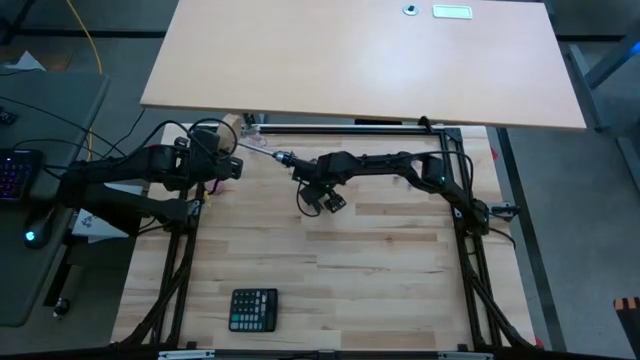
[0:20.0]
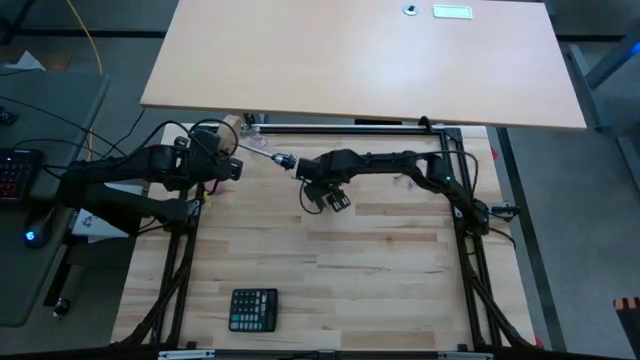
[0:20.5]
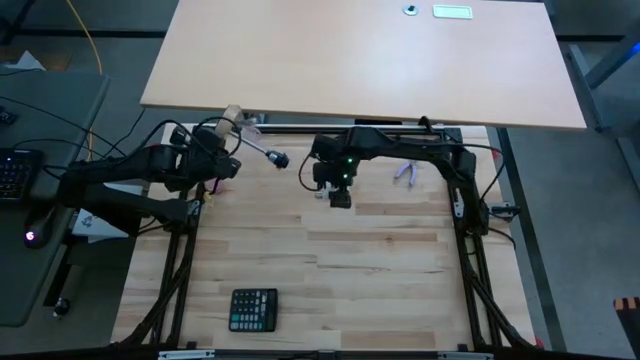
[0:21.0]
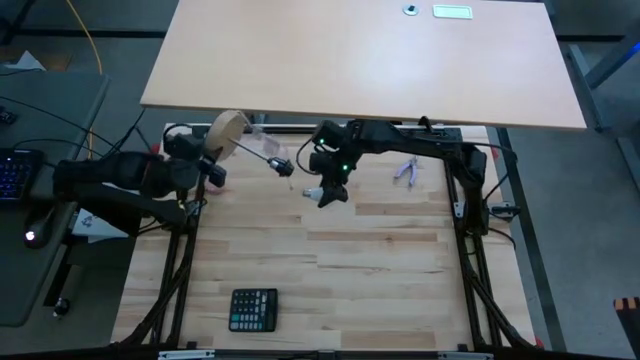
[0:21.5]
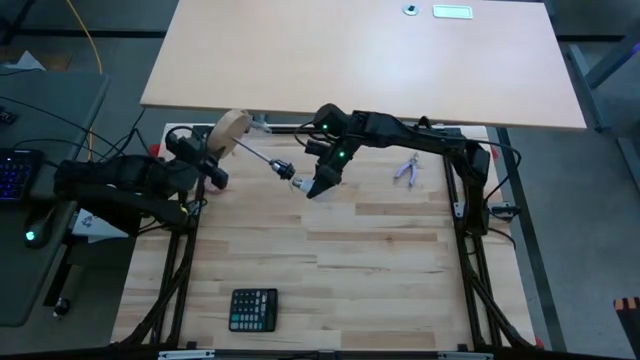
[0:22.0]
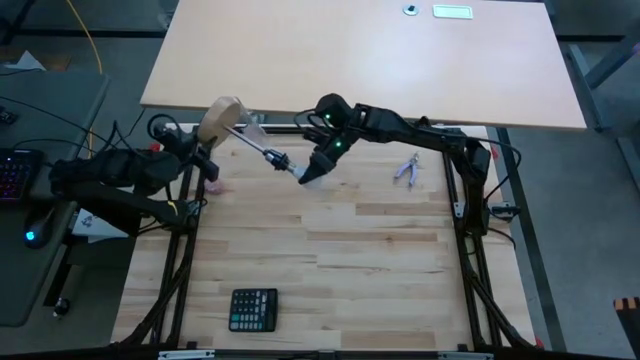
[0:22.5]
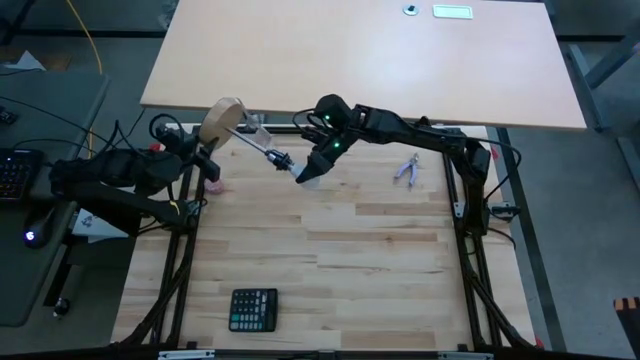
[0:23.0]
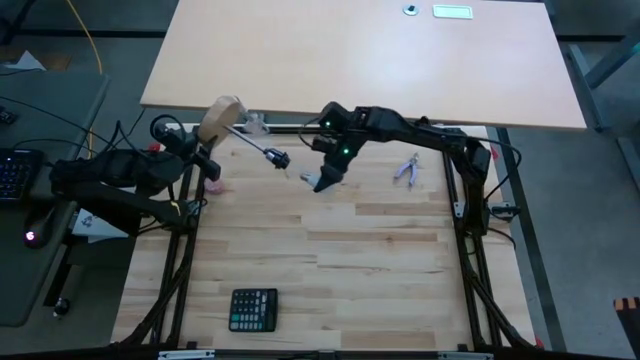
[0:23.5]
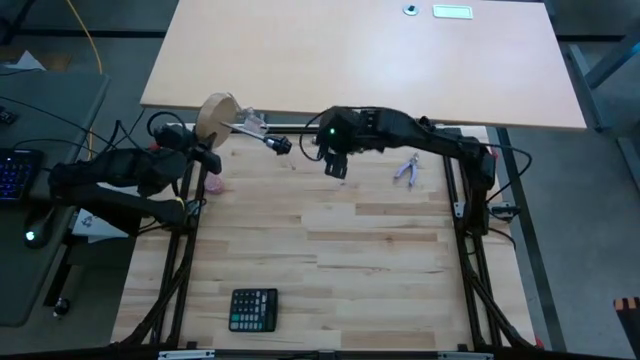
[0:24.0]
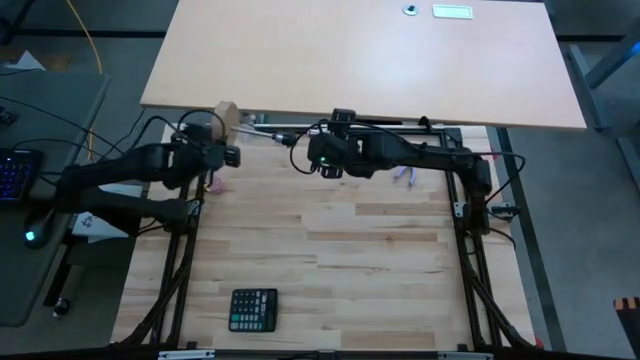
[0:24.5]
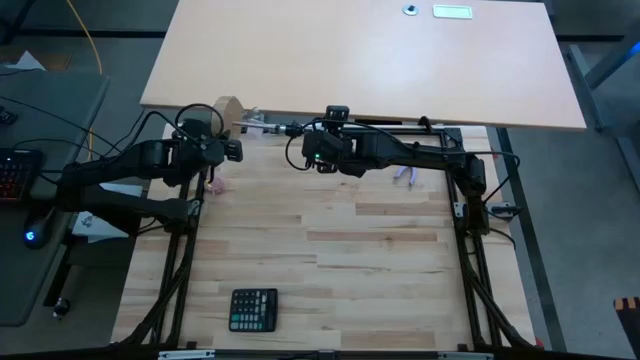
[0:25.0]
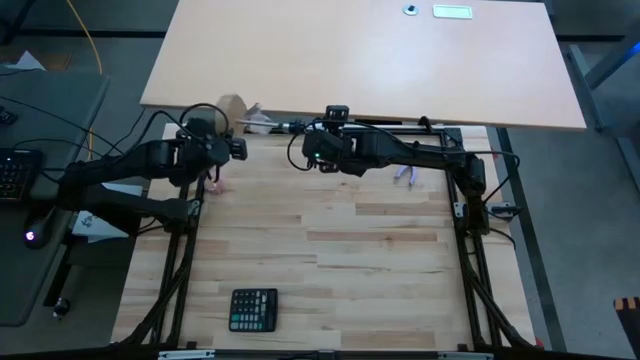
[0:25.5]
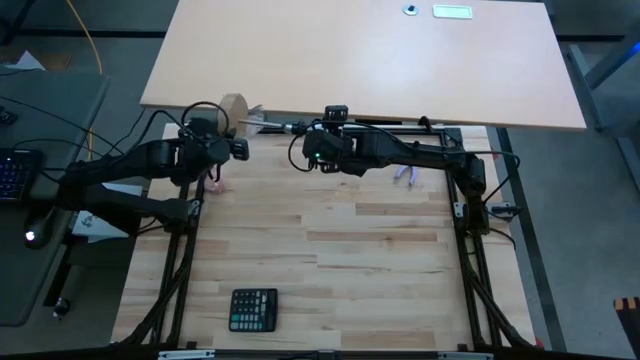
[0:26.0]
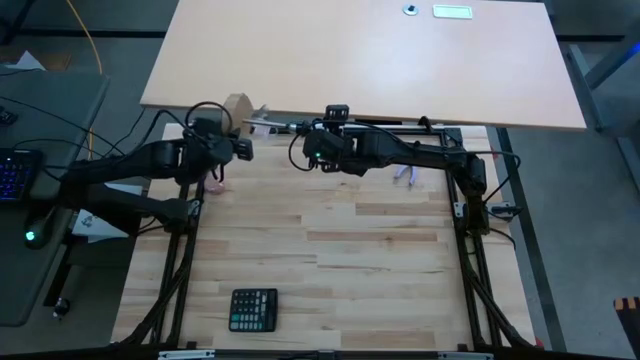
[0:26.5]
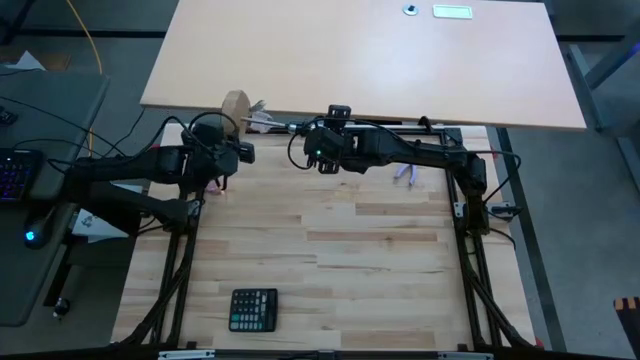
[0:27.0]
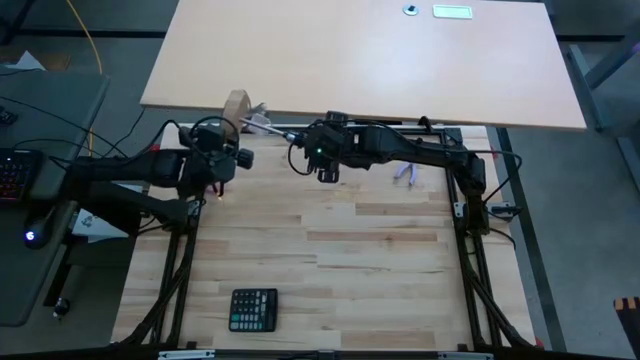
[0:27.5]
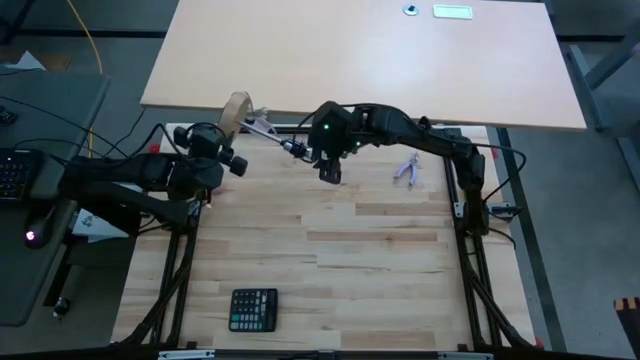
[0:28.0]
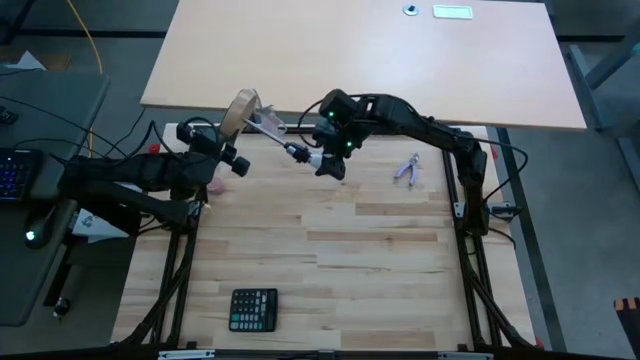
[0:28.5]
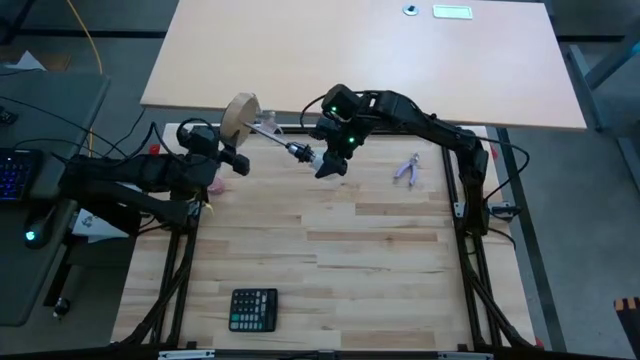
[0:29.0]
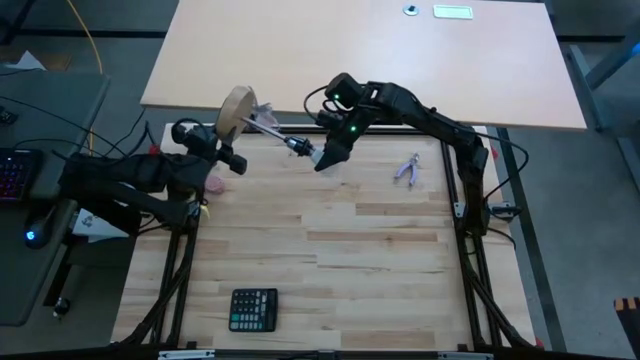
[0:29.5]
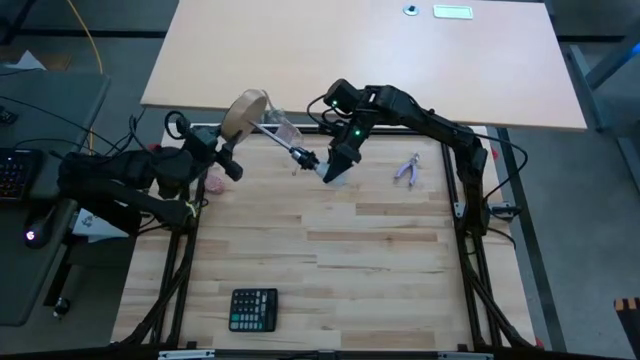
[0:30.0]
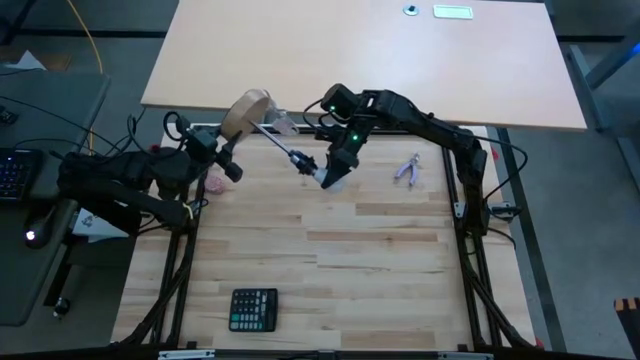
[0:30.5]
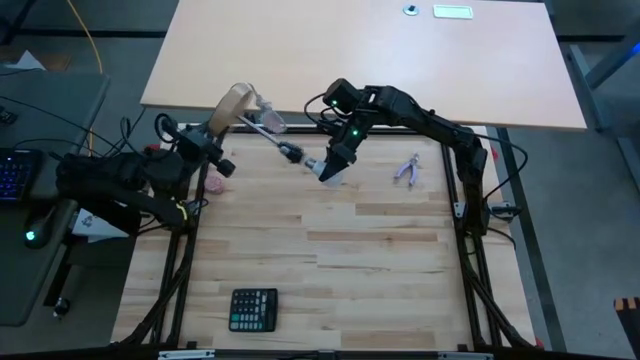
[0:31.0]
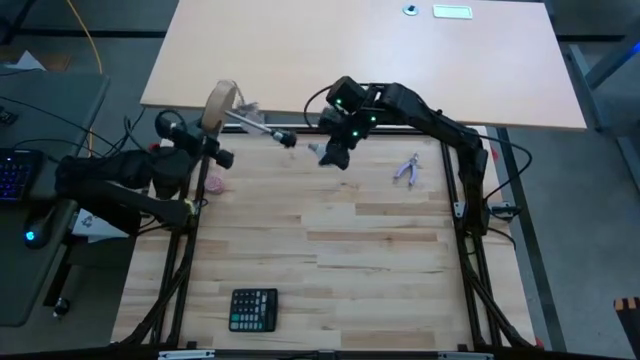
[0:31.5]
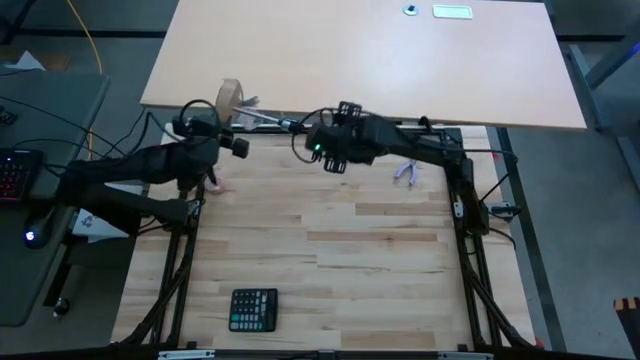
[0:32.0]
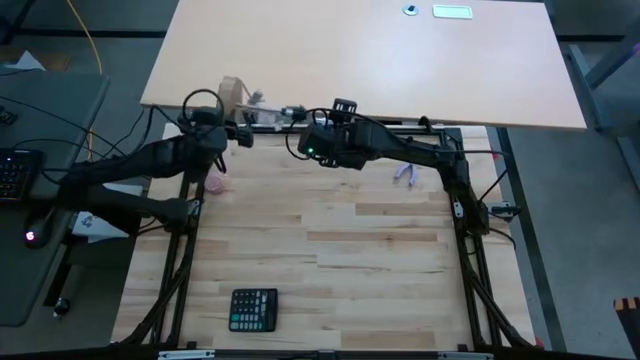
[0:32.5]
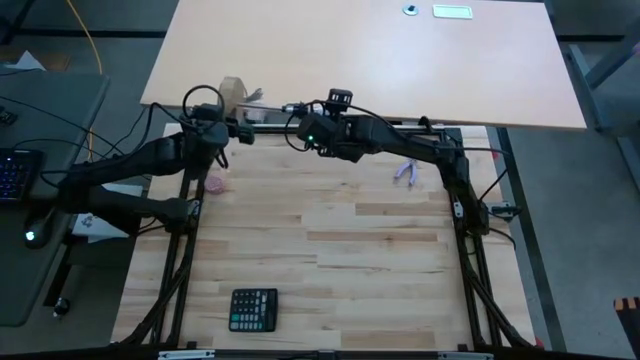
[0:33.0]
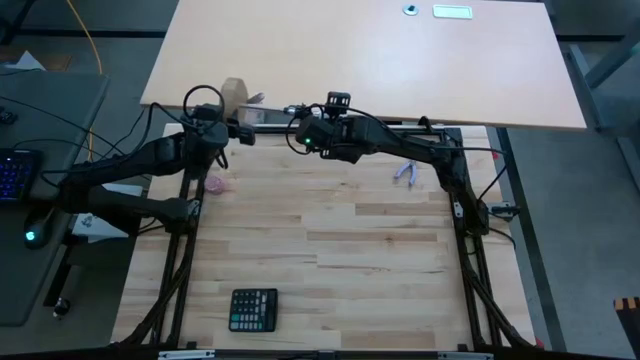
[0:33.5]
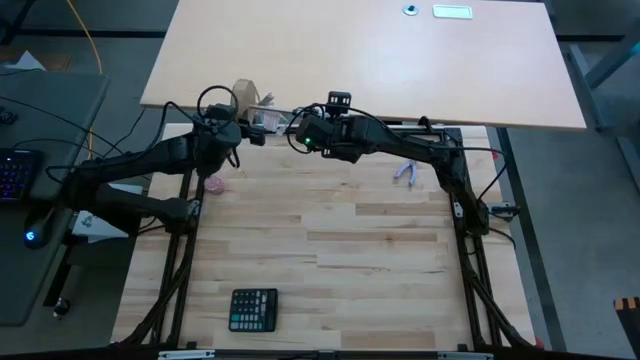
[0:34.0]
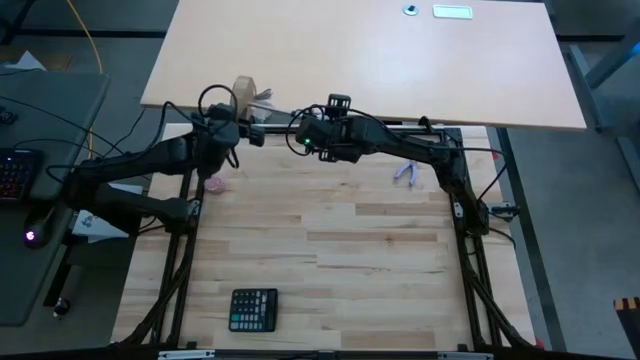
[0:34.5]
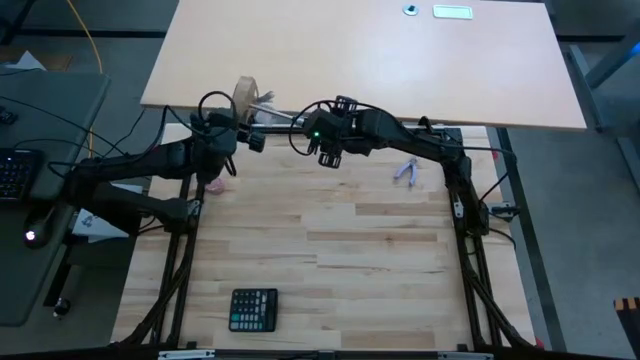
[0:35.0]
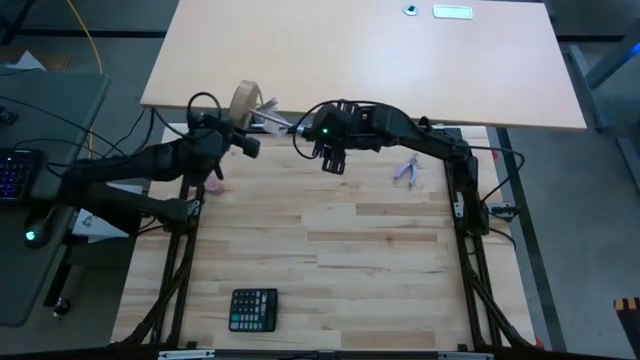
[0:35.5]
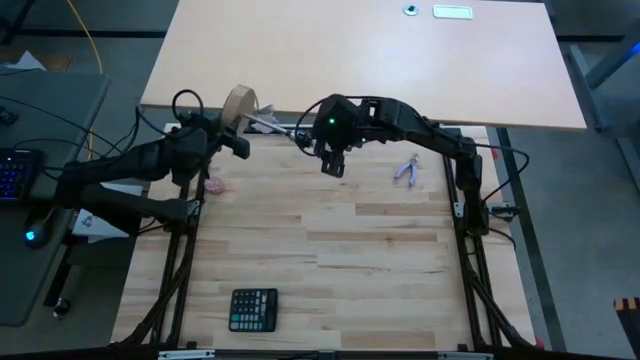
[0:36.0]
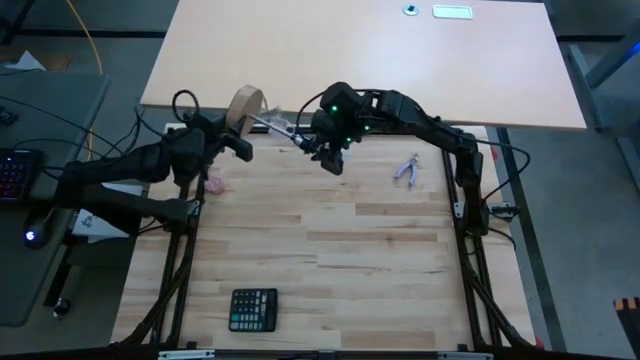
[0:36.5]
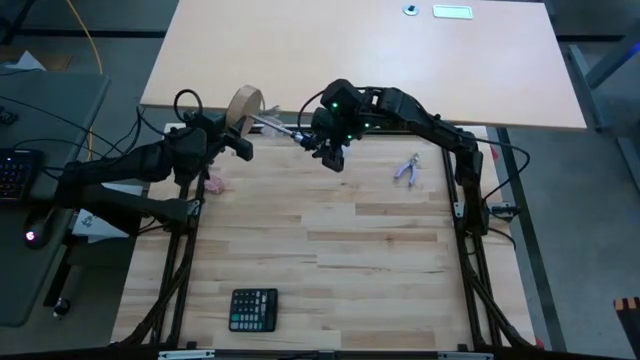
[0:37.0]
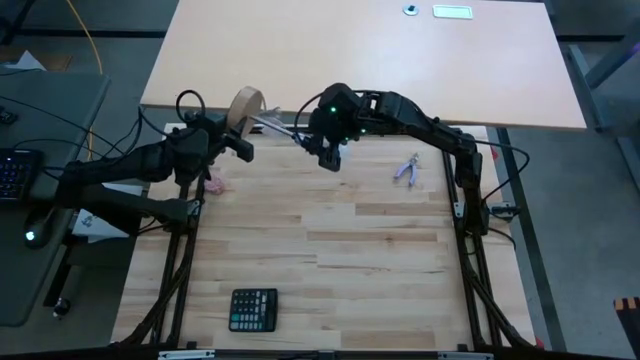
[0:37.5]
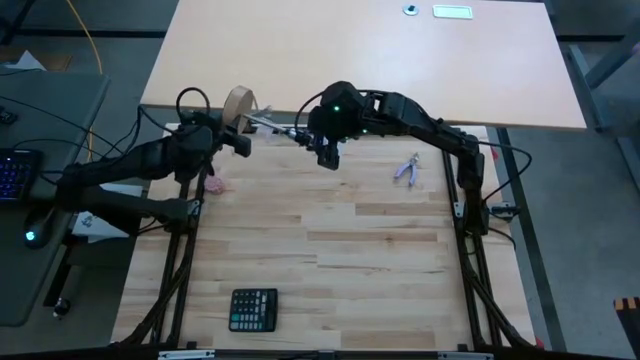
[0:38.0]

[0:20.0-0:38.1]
Task: Screw lightbulb
Insert the white lightbulb into the brown lamp

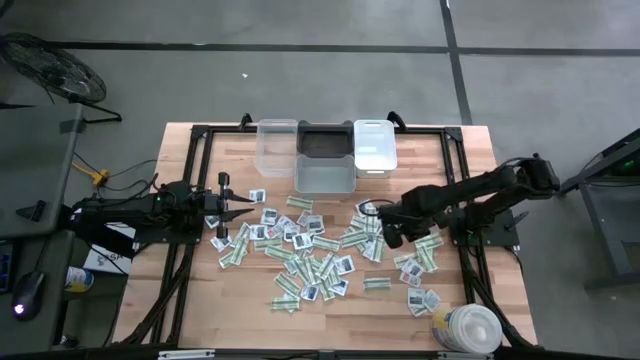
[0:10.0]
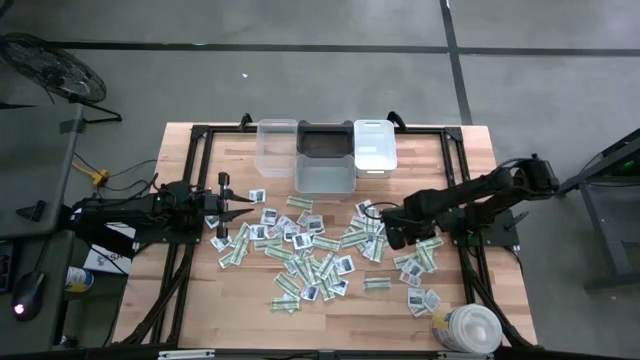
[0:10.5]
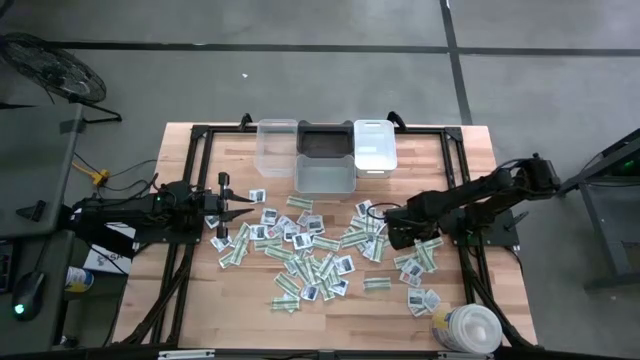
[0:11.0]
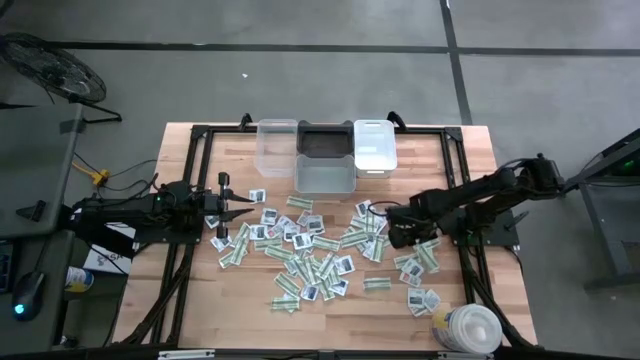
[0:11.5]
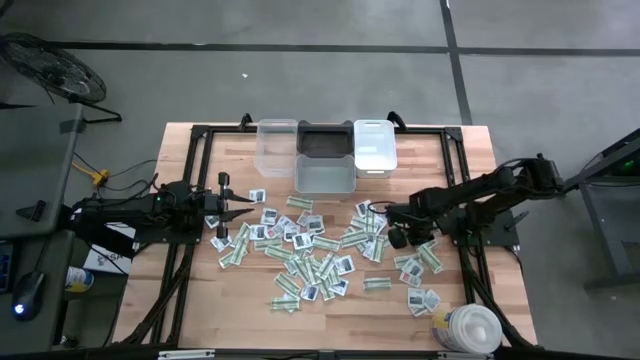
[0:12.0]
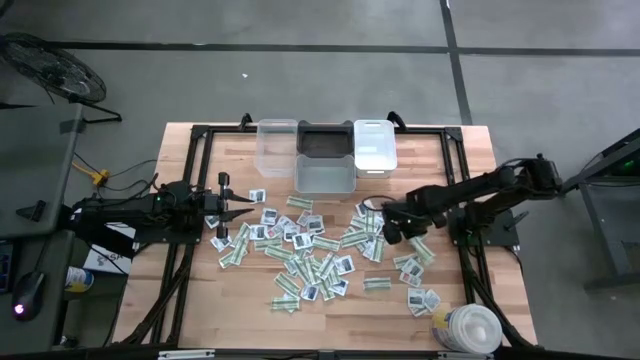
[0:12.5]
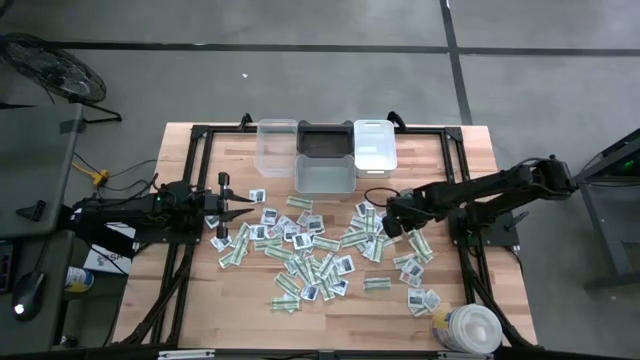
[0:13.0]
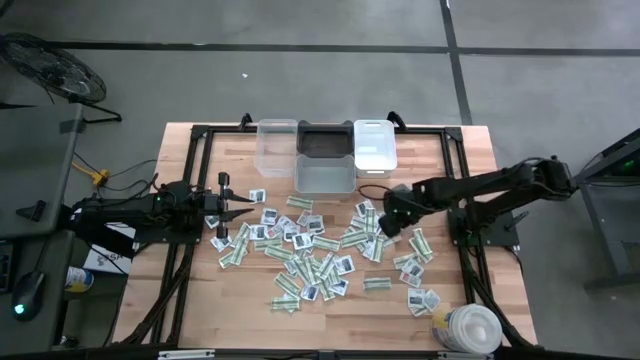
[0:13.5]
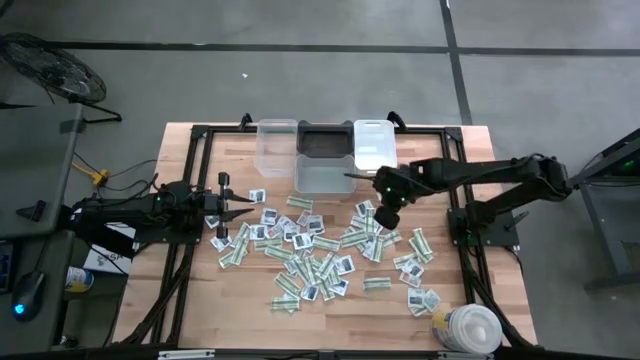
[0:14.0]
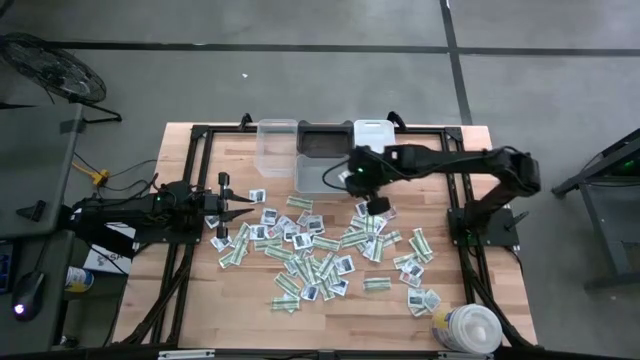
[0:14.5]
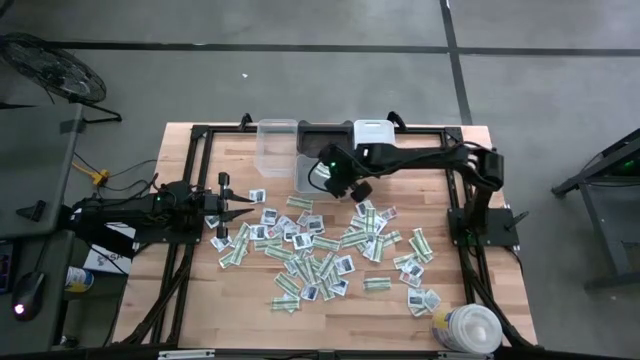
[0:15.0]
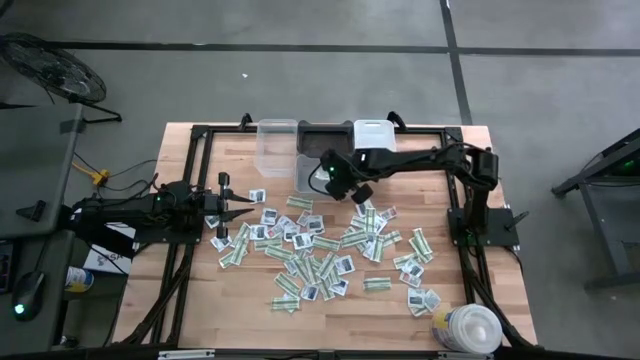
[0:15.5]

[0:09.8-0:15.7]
Task: Pick & Place First Aid Supplies
Put the bandage pack into the gray bin
